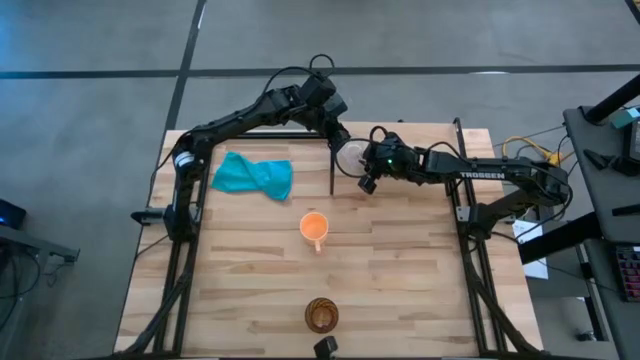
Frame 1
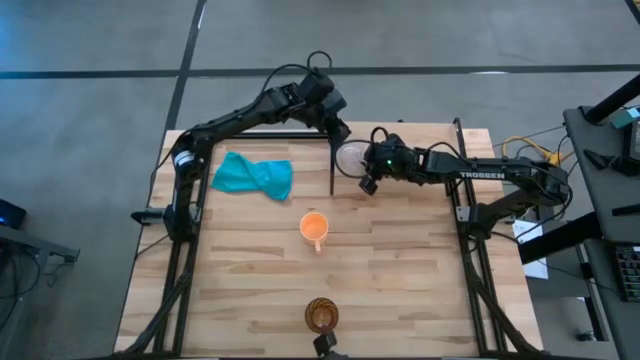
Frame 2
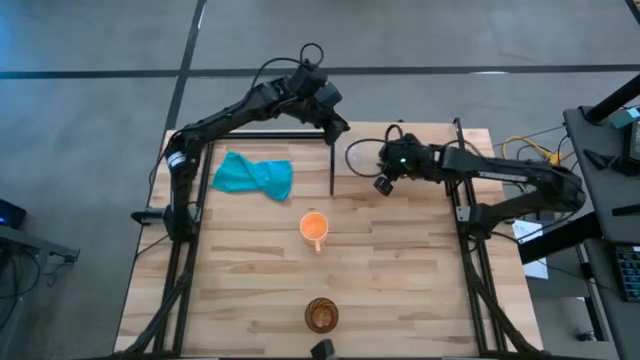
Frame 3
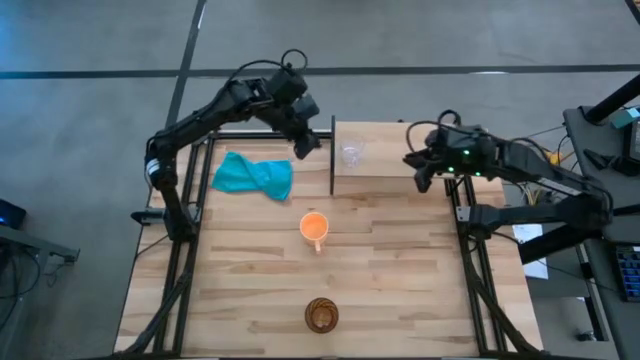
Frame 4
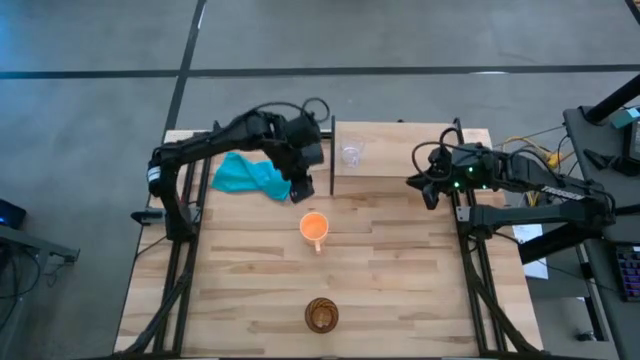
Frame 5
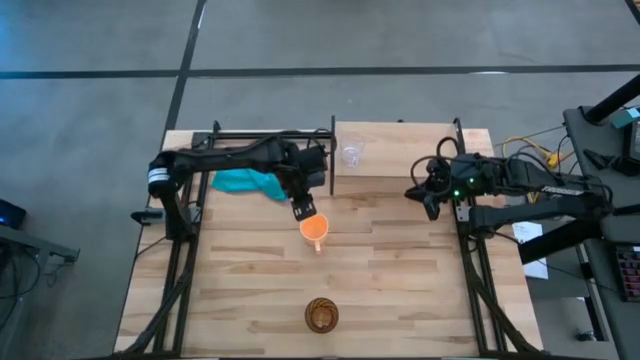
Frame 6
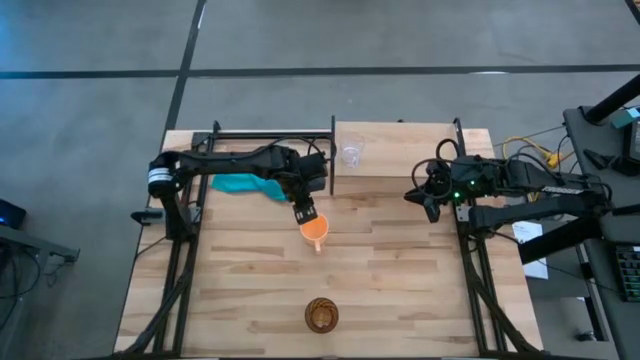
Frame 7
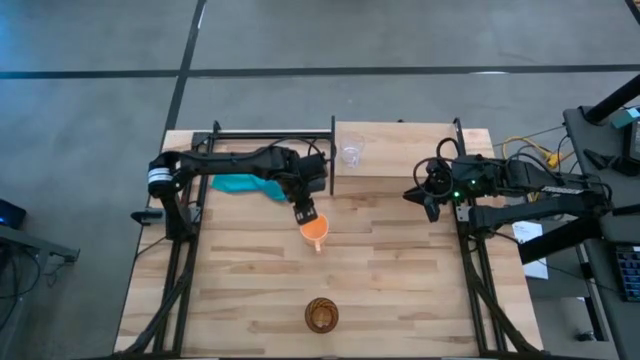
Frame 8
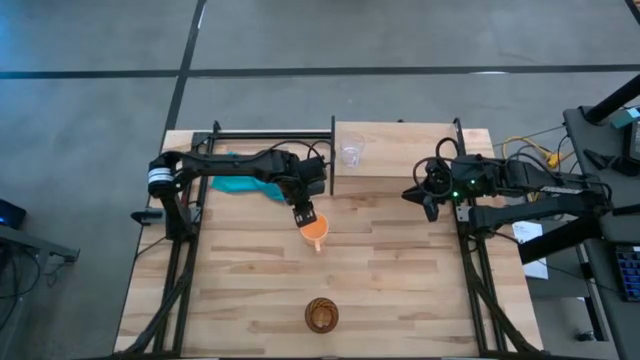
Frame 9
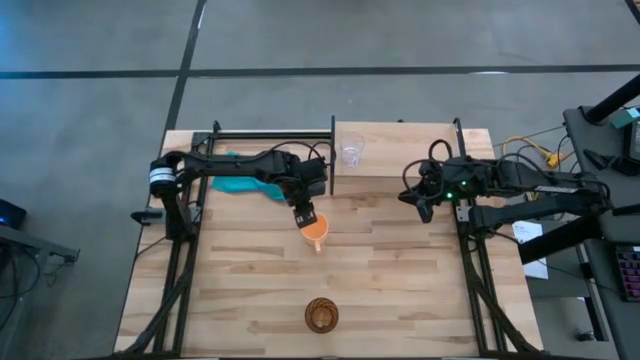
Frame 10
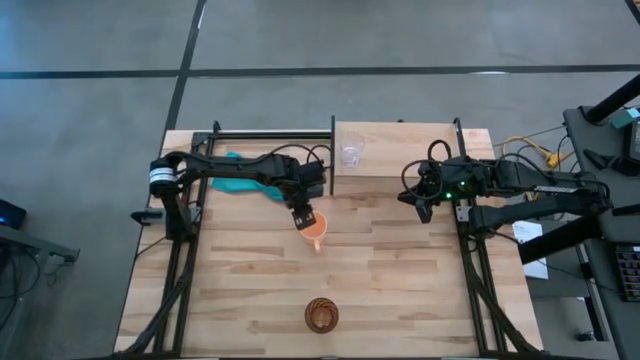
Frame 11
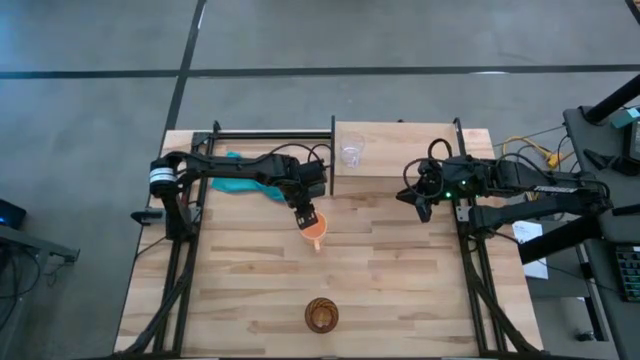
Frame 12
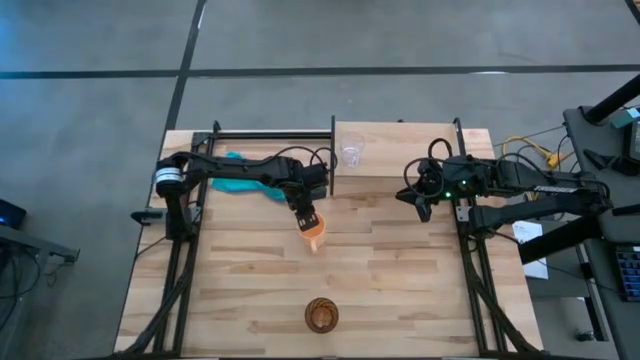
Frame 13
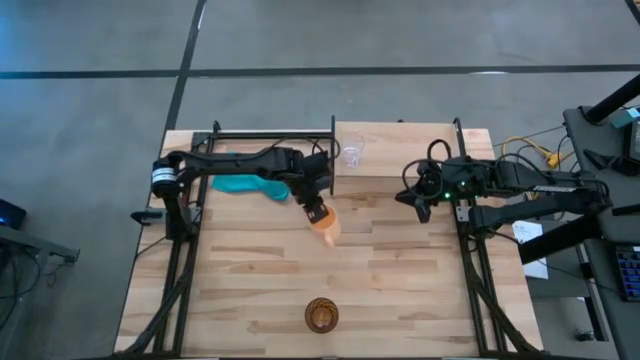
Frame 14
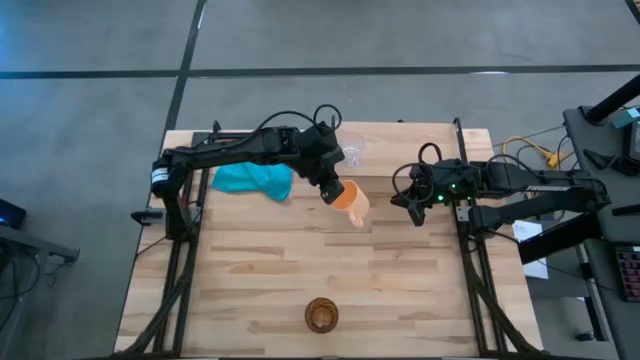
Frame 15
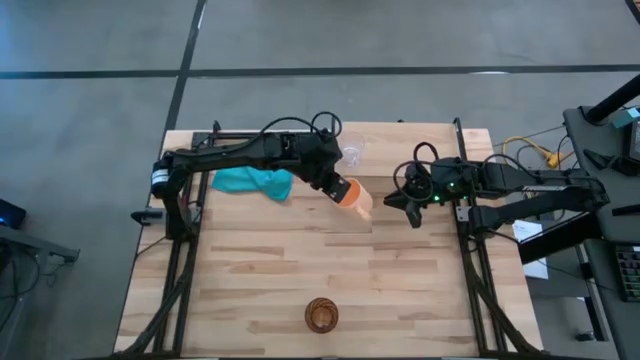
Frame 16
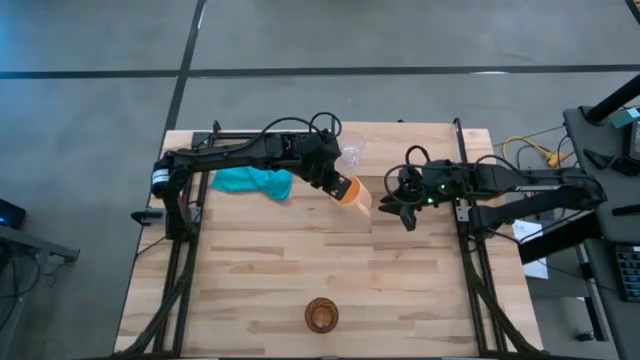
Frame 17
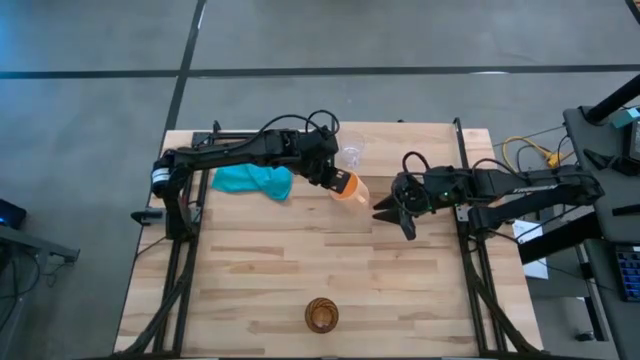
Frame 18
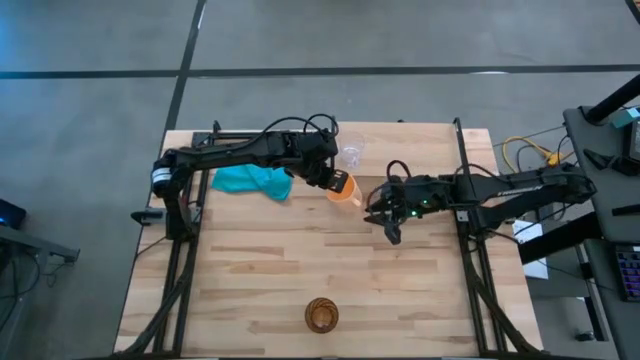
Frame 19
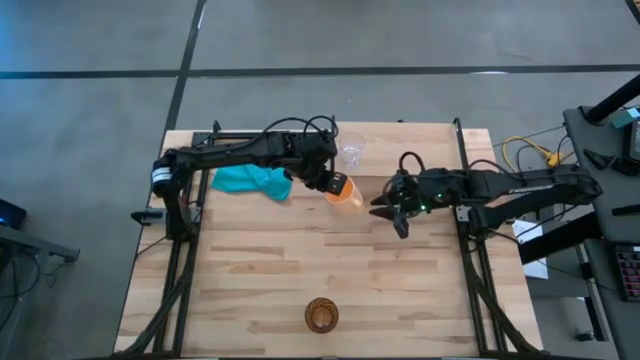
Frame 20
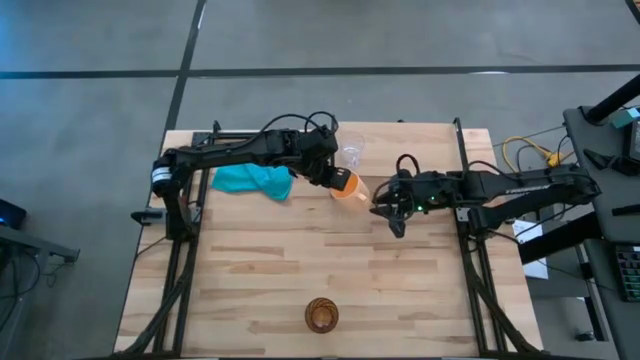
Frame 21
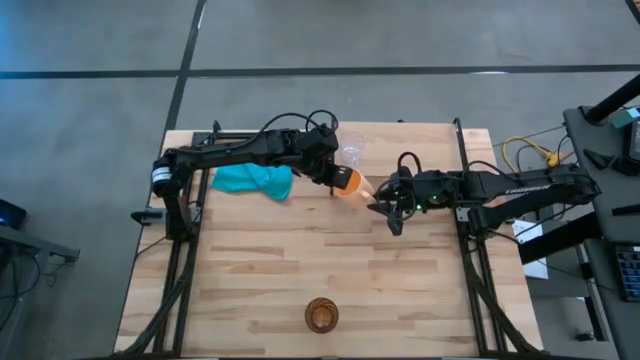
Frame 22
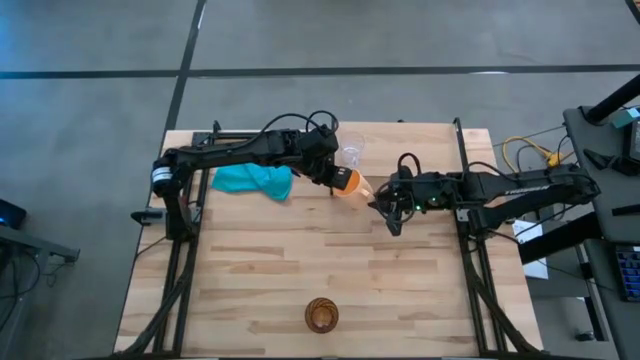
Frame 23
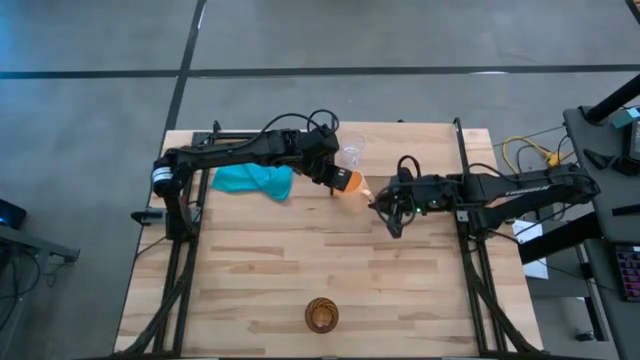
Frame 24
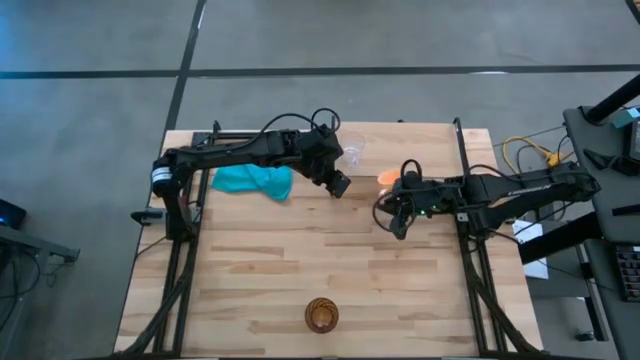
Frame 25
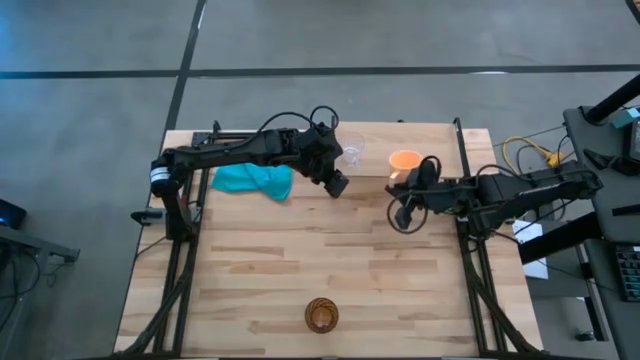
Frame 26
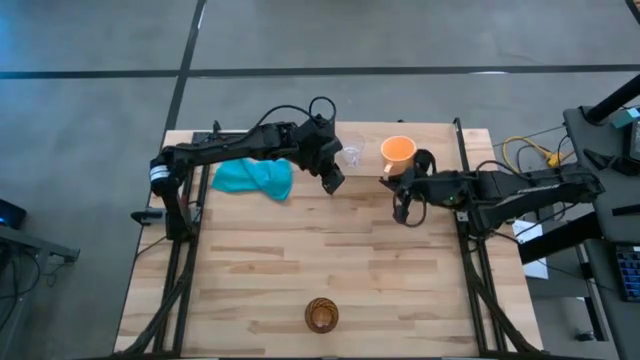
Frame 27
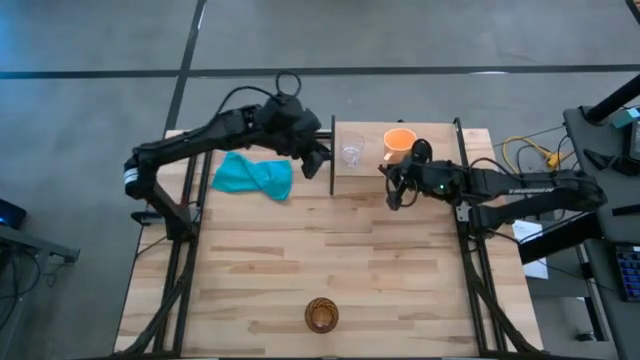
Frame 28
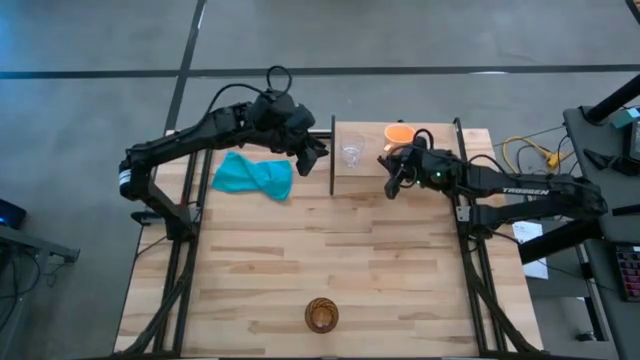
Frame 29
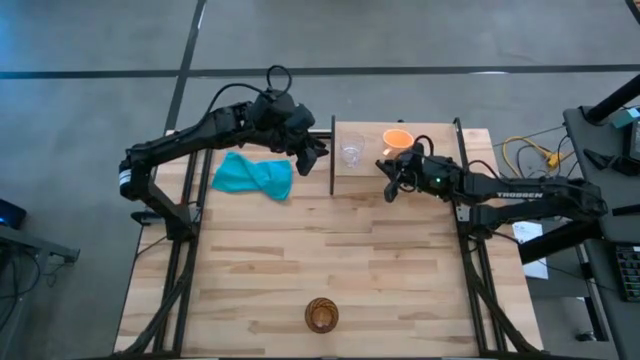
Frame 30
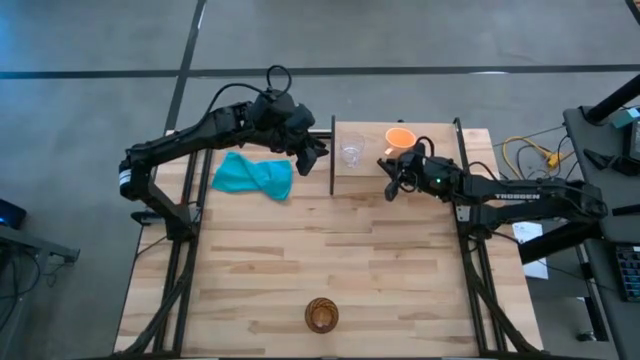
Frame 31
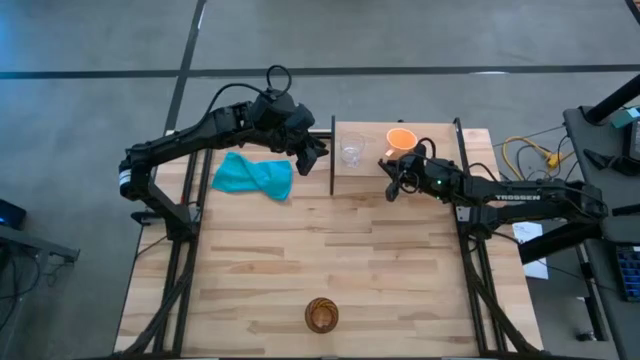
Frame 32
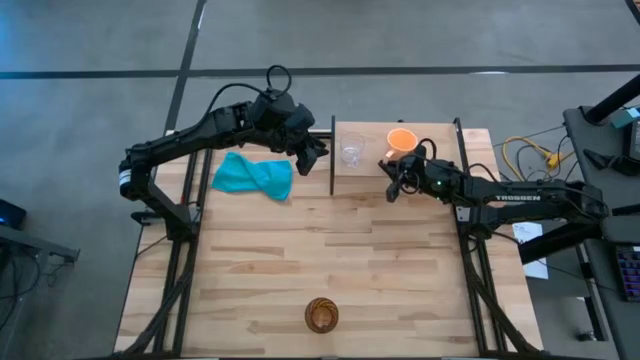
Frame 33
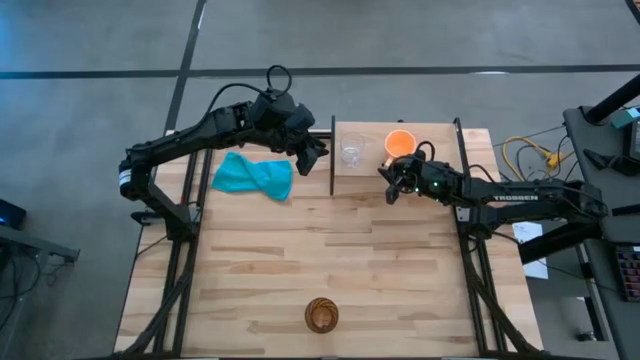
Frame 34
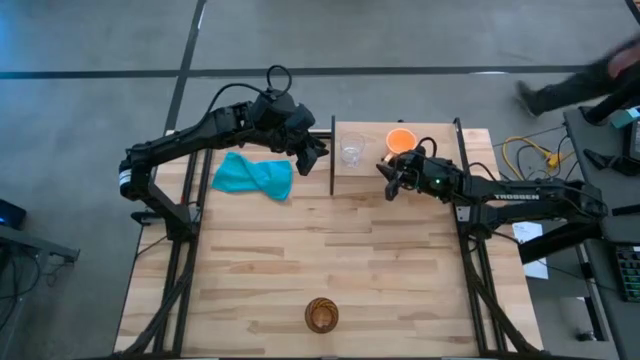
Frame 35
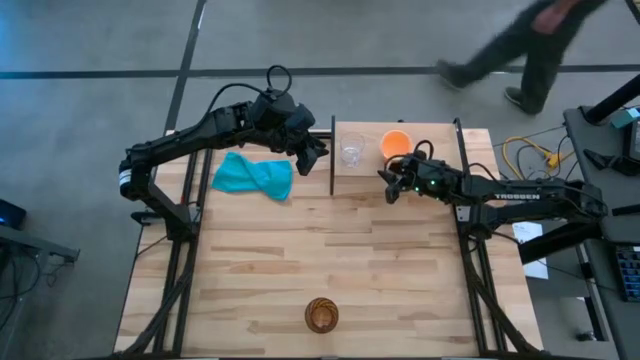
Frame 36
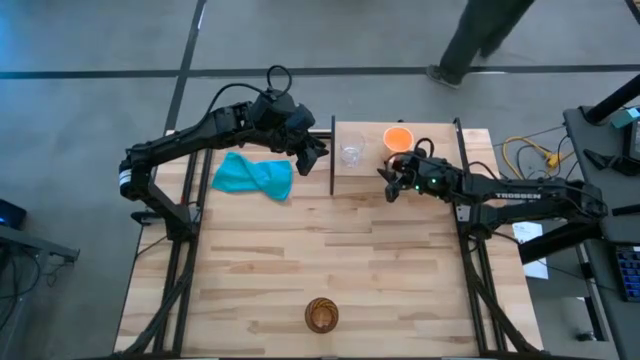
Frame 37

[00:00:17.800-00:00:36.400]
Task: Stack small to large cups/mugs on shelf
Put the orange mug on the shelf
